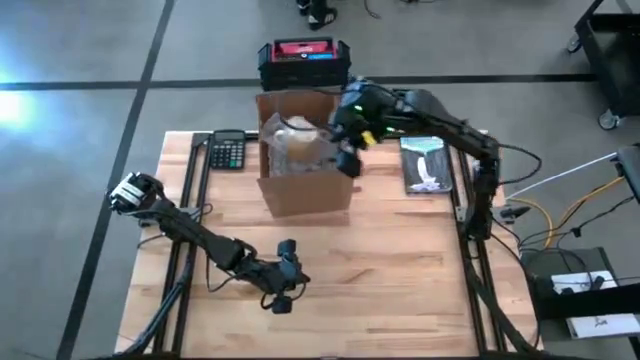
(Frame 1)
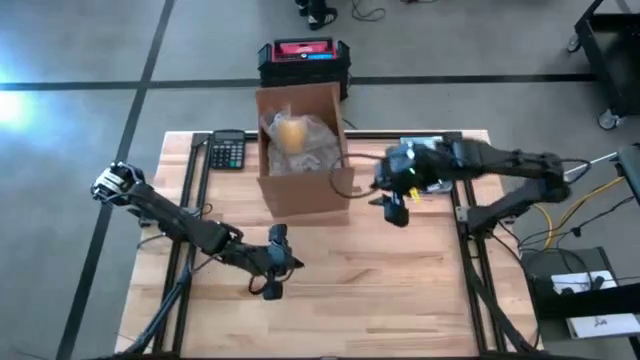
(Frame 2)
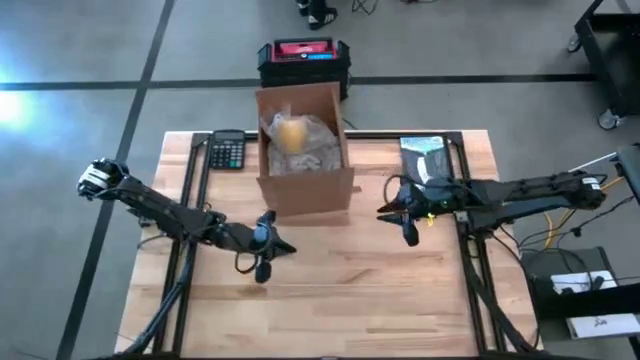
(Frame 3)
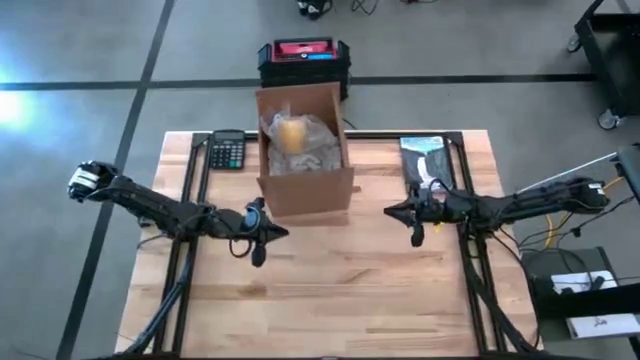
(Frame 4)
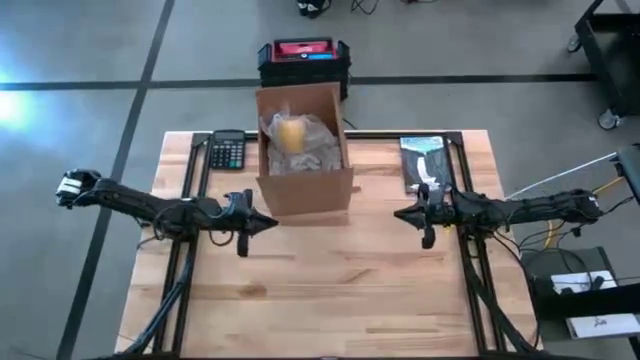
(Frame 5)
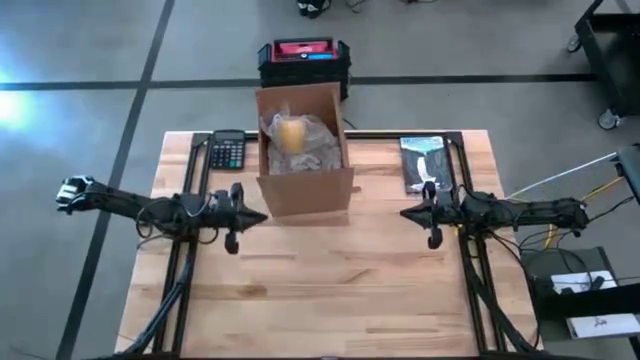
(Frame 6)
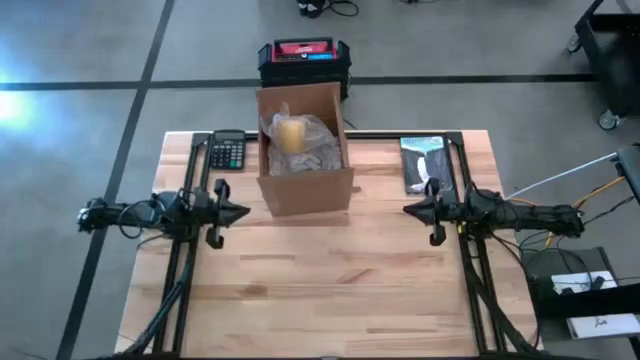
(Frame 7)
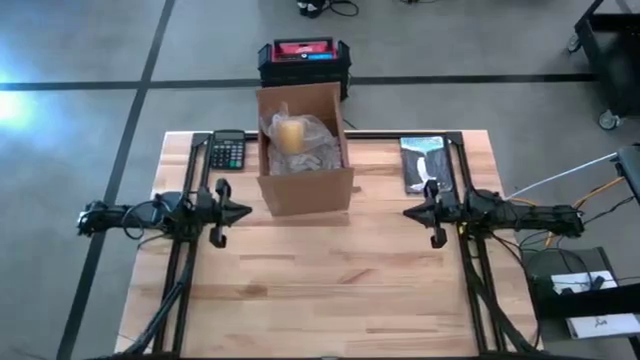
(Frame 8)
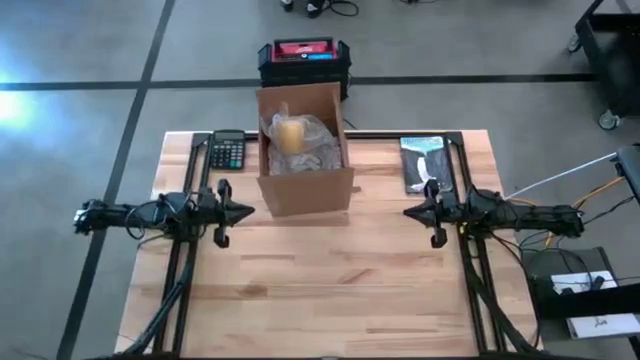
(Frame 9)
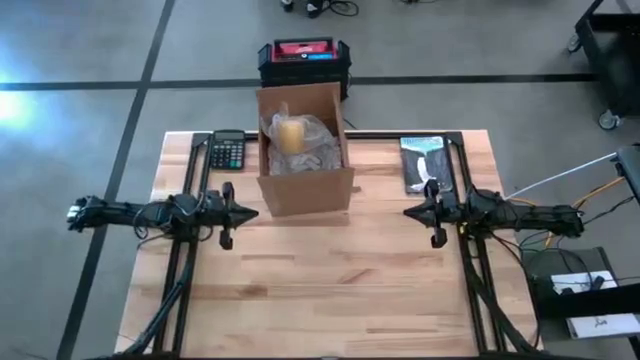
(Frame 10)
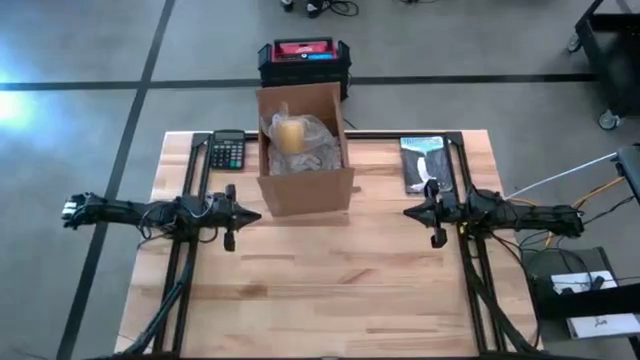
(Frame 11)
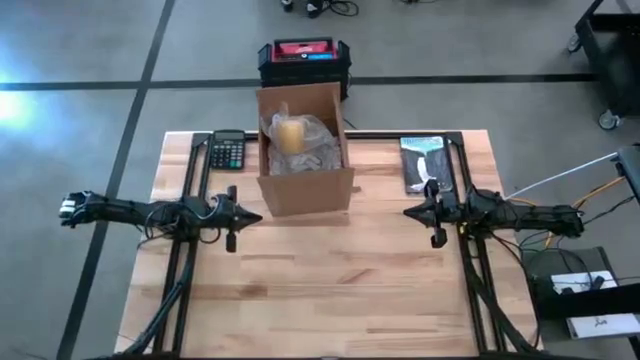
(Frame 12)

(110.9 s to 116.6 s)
Task: wrap mug
Return to Home Position

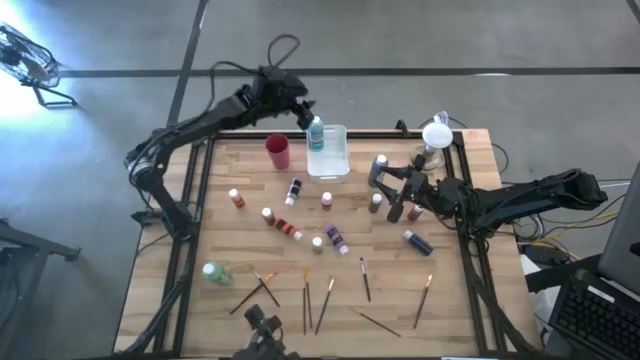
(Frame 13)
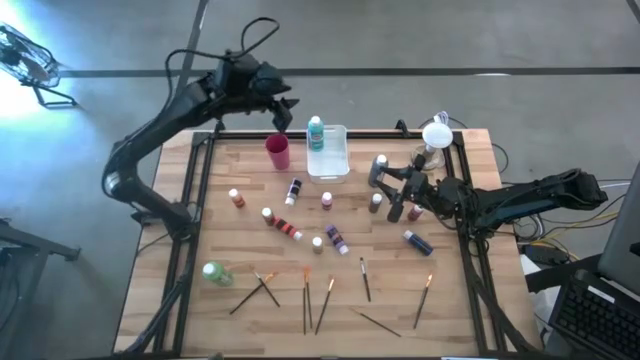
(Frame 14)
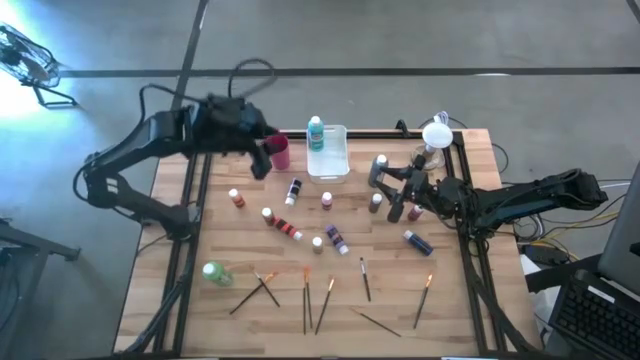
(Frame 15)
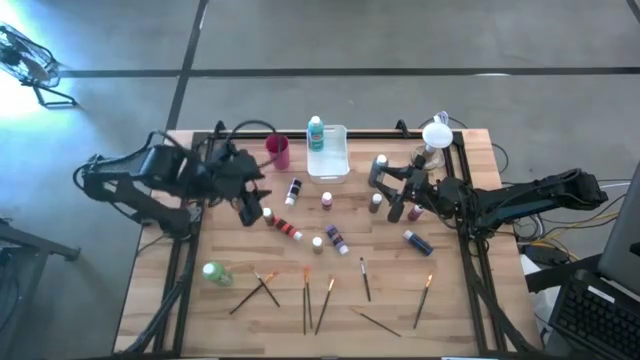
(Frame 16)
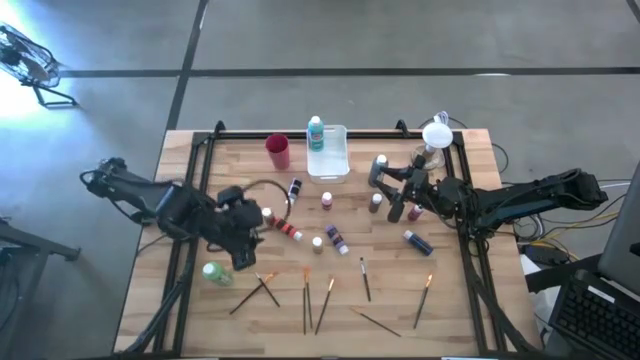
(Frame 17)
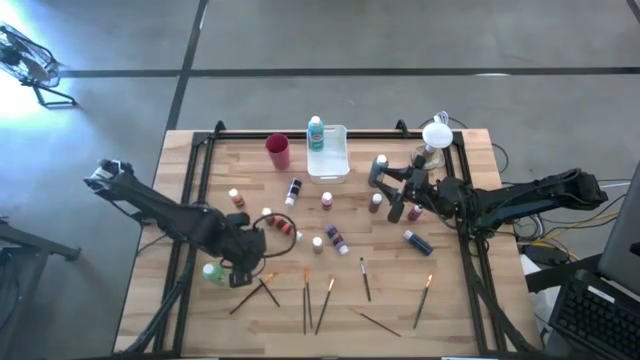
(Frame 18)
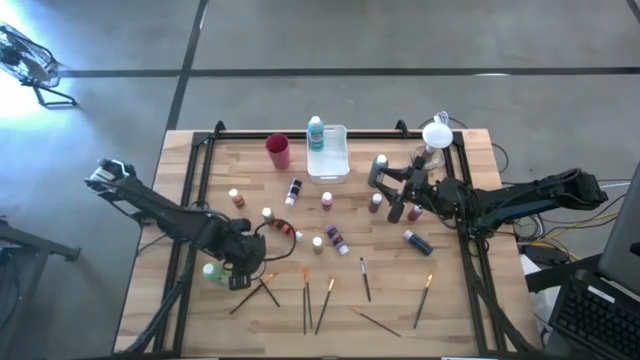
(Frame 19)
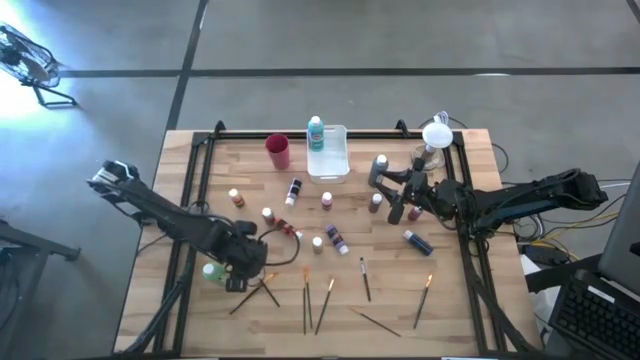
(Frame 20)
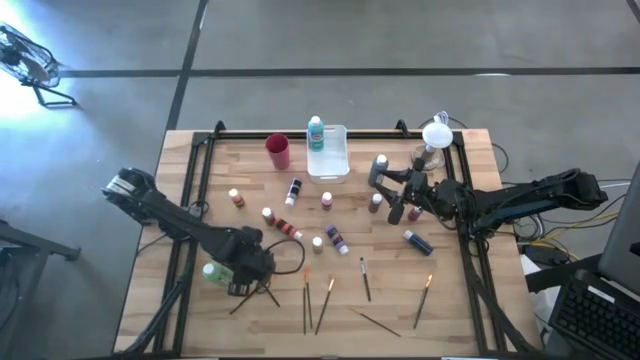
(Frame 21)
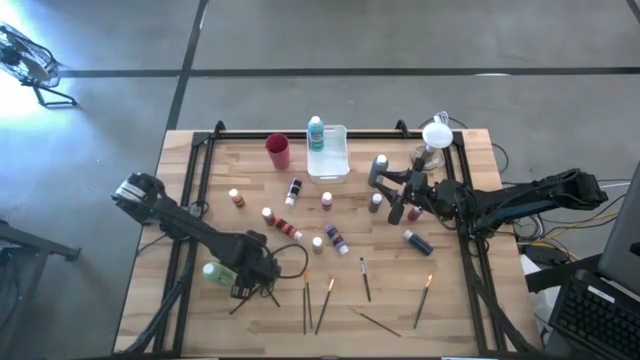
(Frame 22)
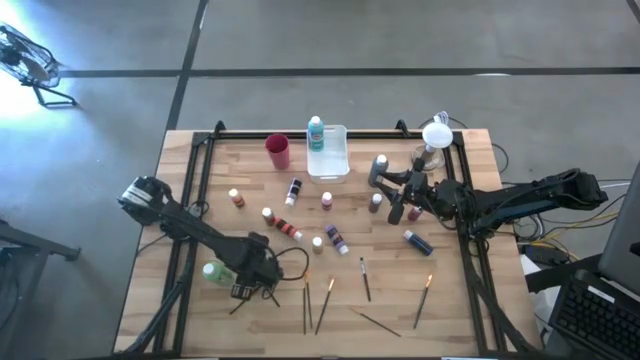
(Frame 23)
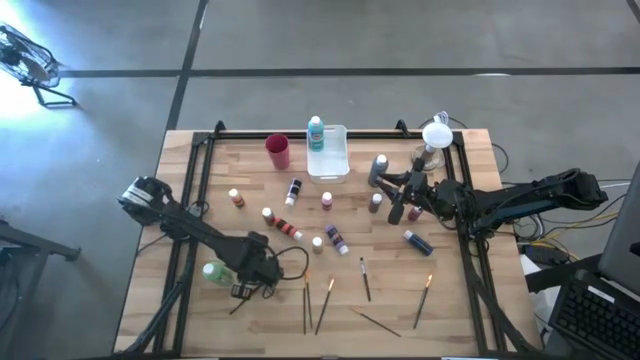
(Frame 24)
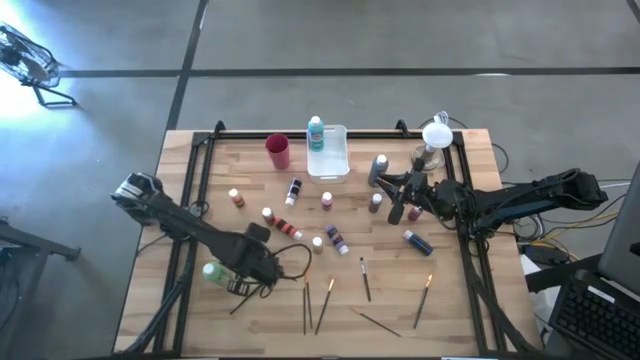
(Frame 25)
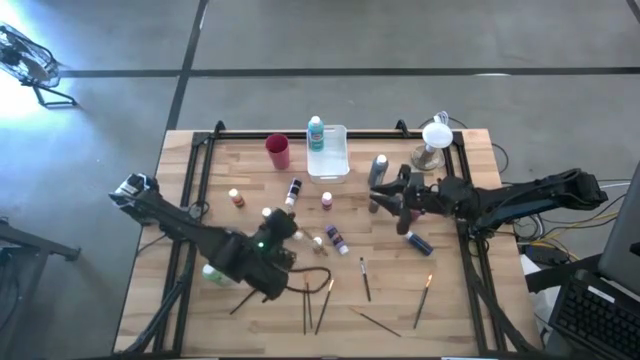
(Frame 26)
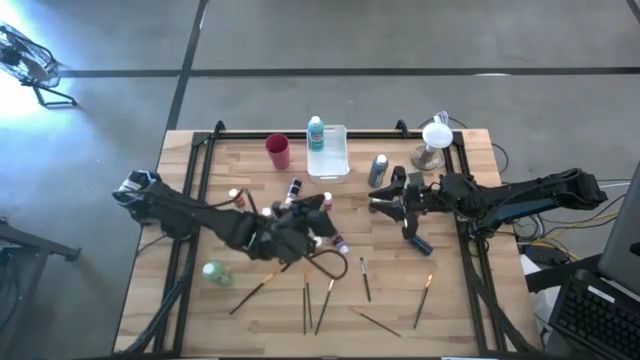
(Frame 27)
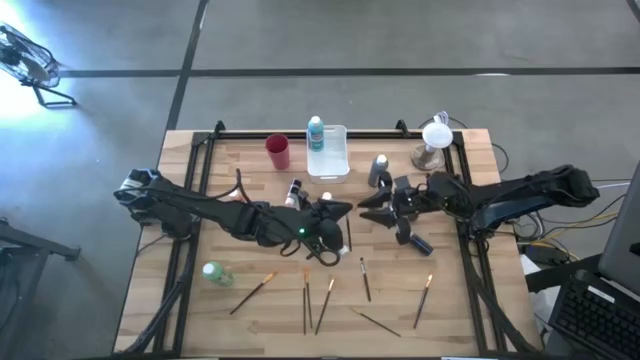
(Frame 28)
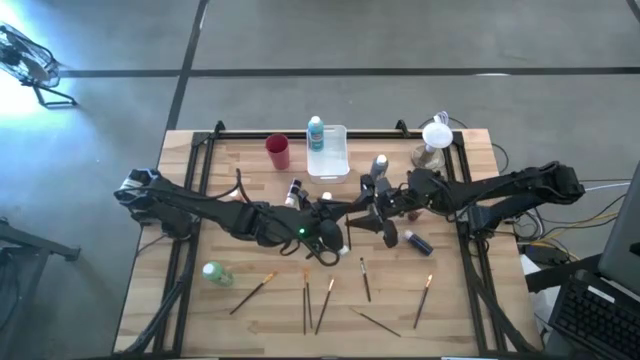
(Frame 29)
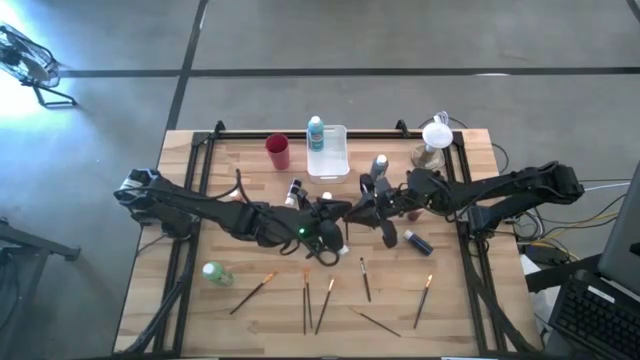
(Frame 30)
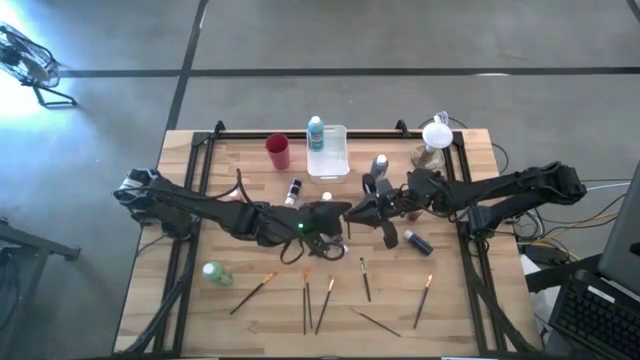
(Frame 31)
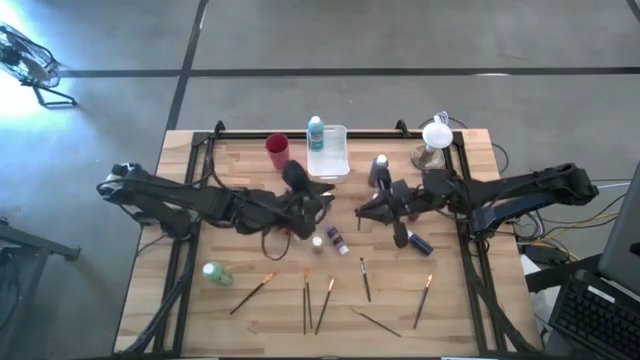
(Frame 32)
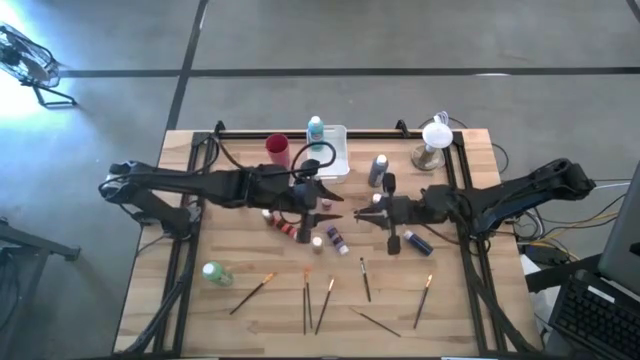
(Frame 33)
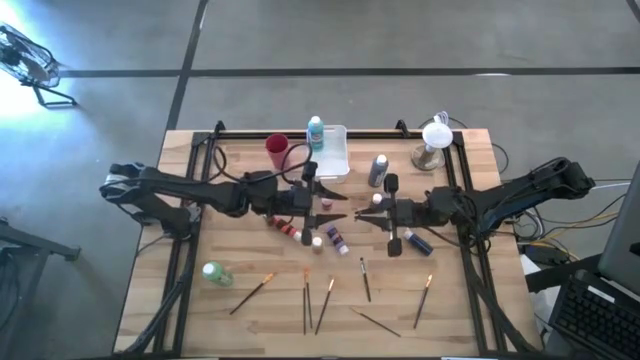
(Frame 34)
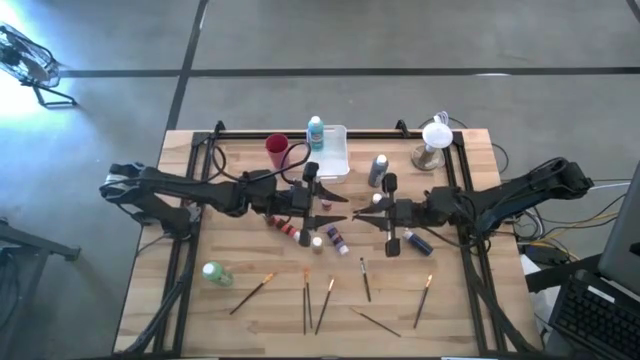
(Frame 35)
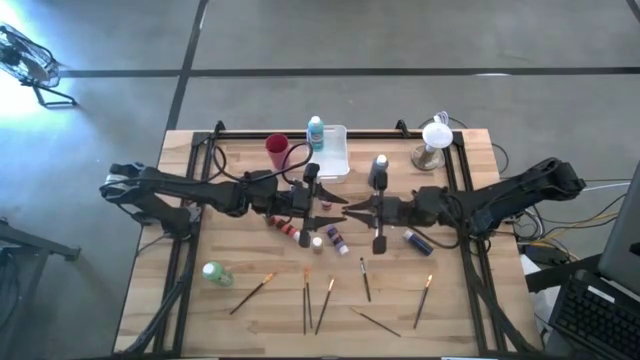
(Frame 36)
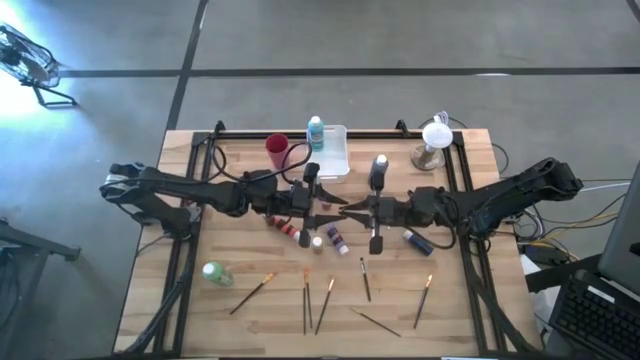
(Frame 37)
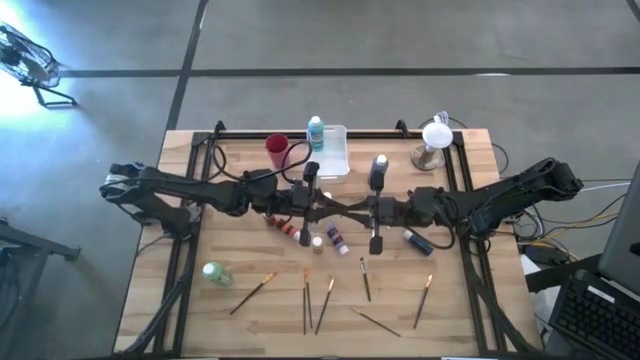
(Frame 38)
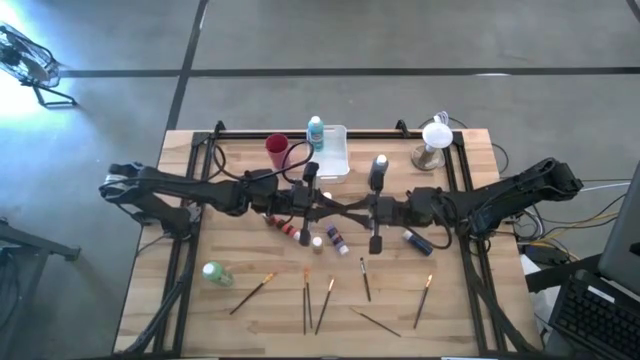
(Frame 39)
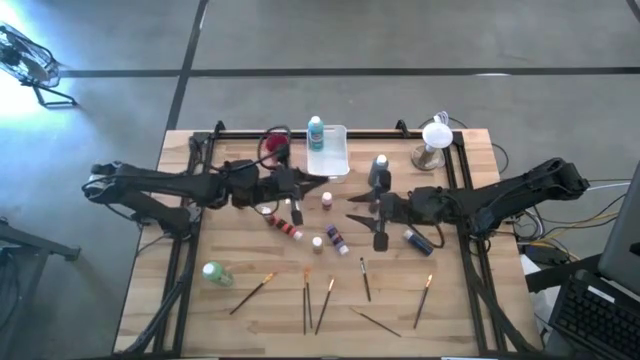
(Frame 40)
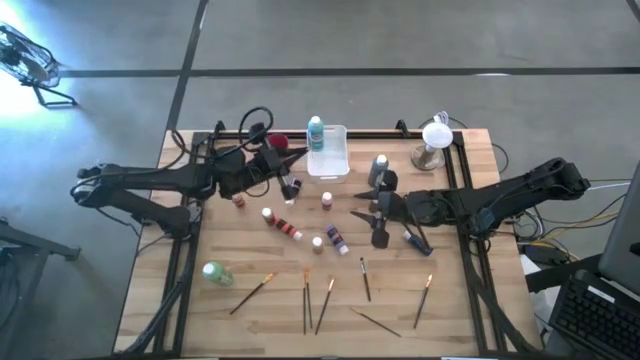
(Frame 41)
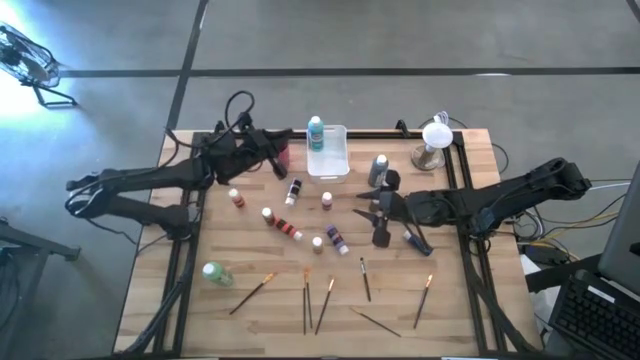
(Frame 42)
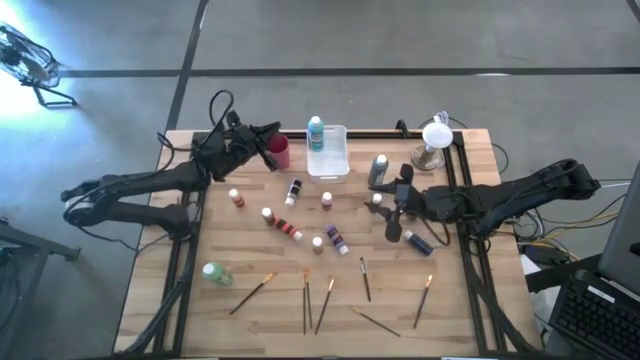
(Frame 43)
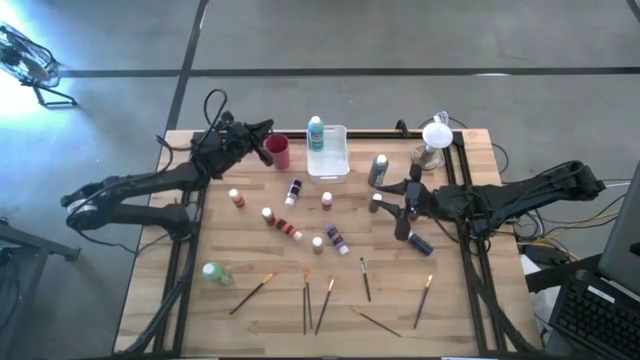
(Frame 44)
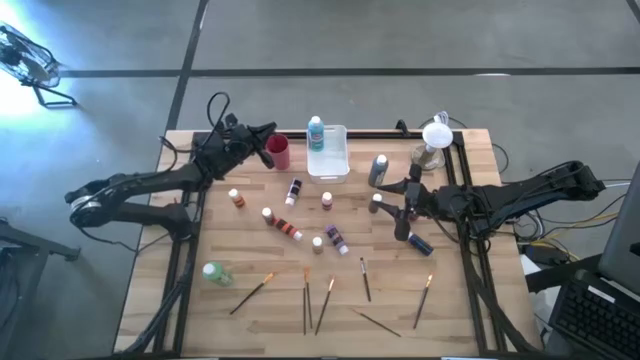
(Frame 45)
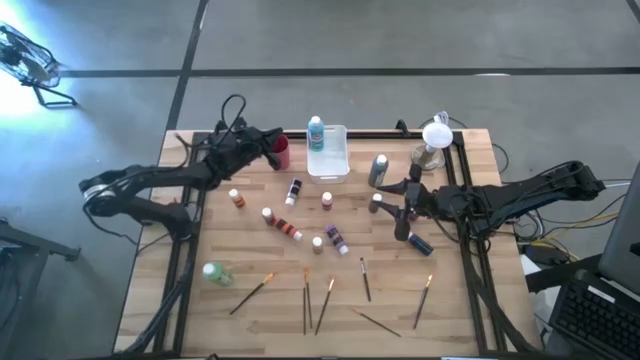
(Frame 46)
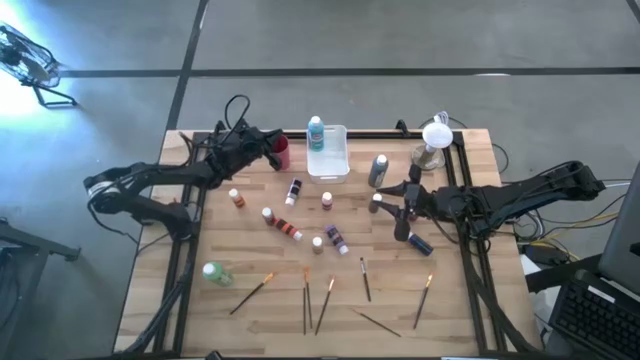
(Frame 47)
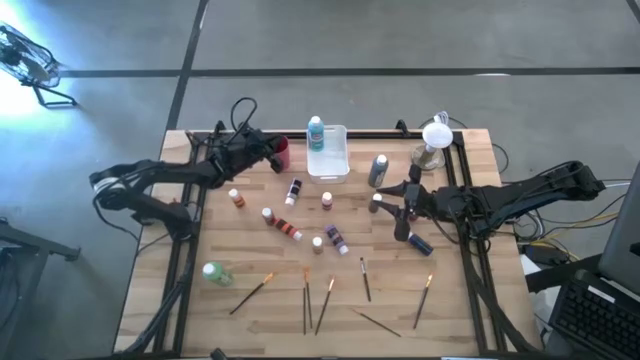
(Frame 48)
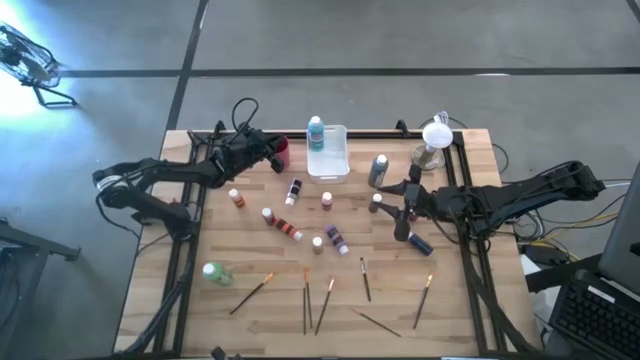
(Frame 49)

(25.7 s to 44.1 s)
Task: Pick & Place Paint Supplies
Put the silver paint brush into the pink cup
